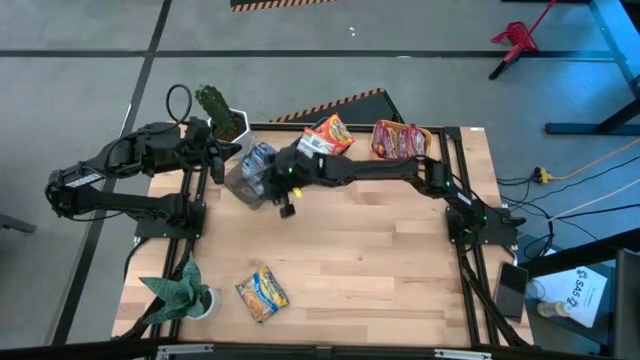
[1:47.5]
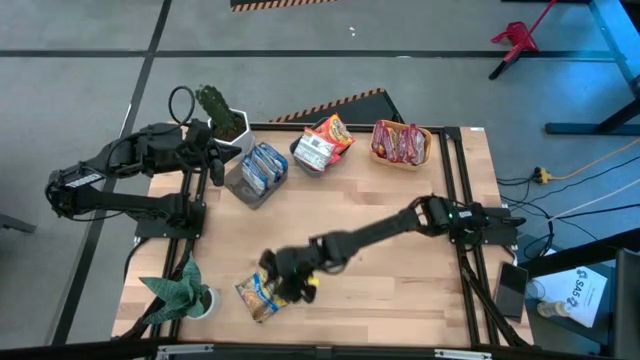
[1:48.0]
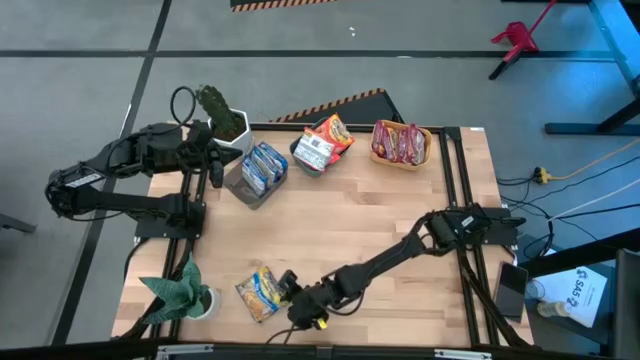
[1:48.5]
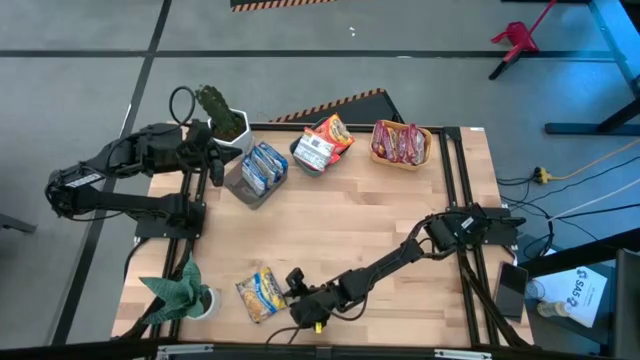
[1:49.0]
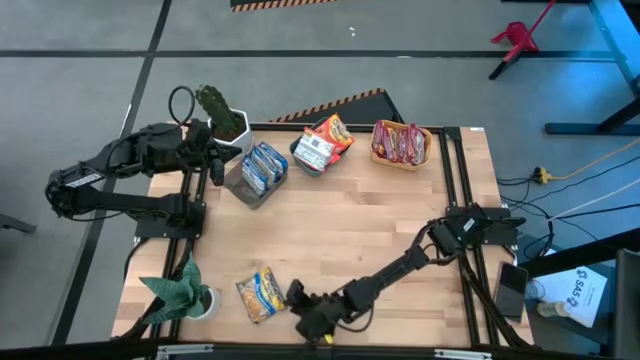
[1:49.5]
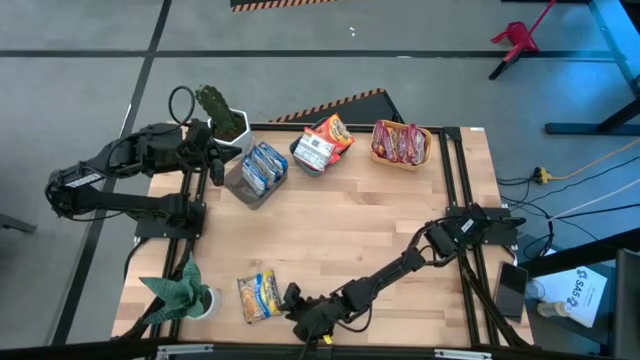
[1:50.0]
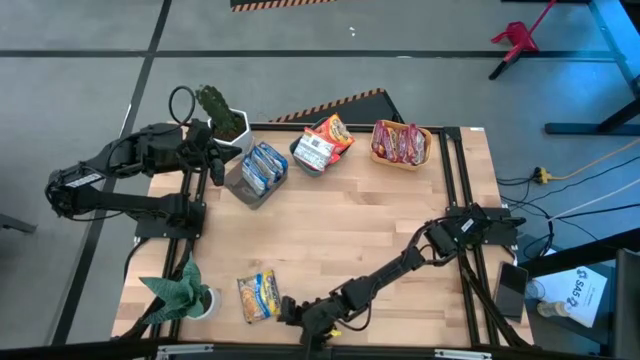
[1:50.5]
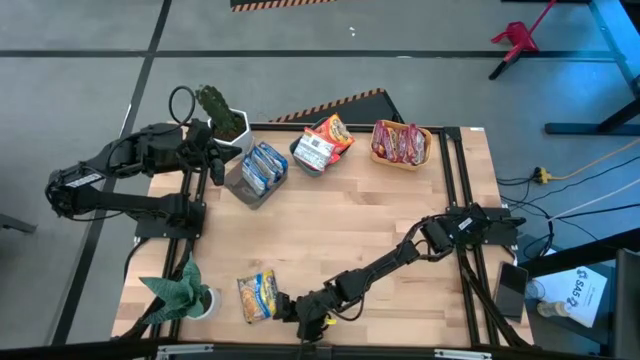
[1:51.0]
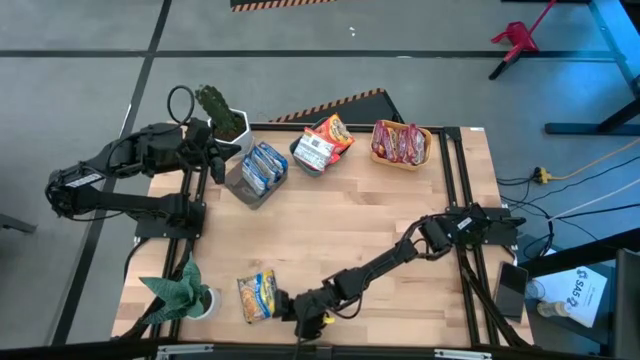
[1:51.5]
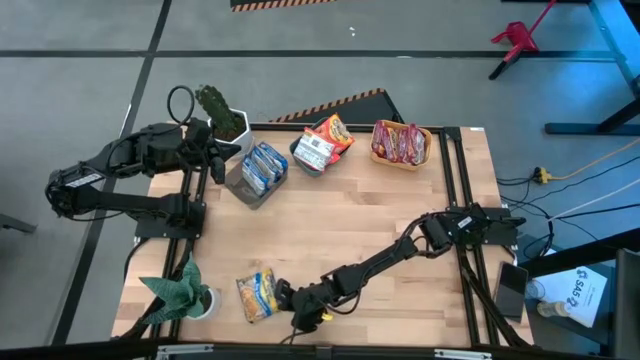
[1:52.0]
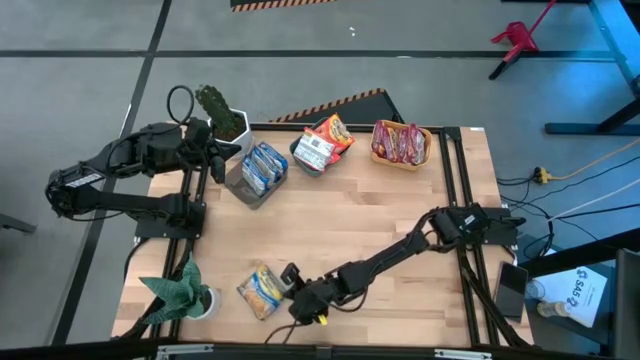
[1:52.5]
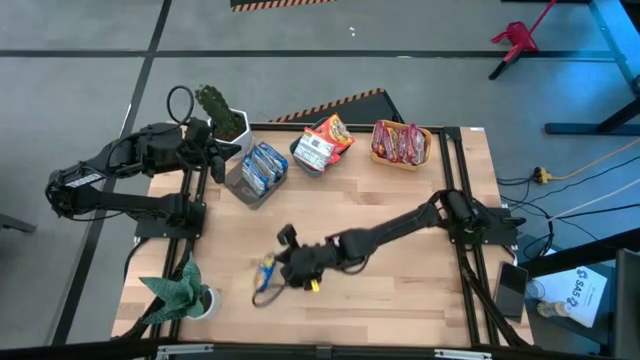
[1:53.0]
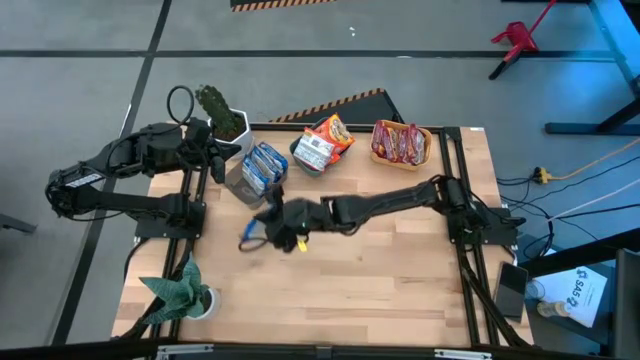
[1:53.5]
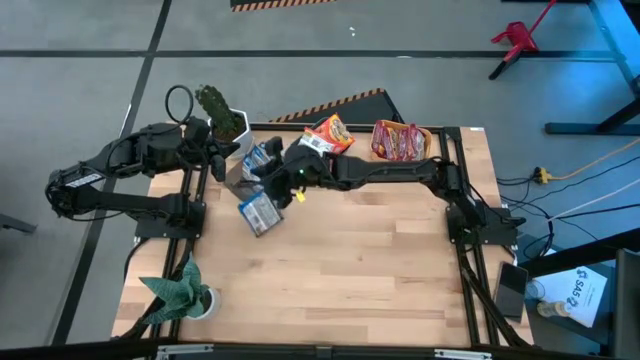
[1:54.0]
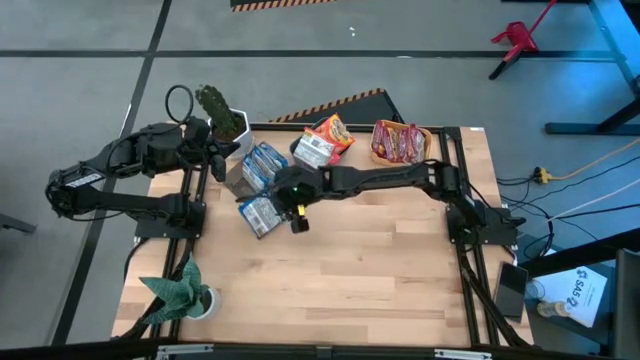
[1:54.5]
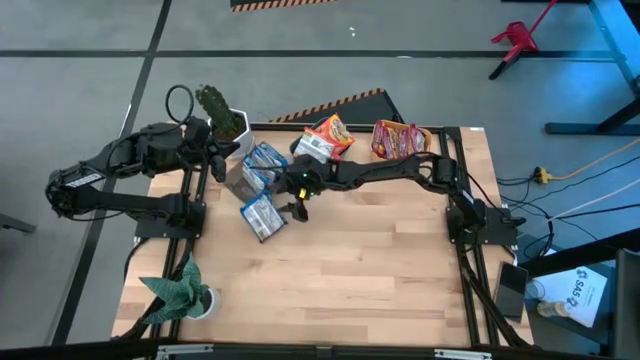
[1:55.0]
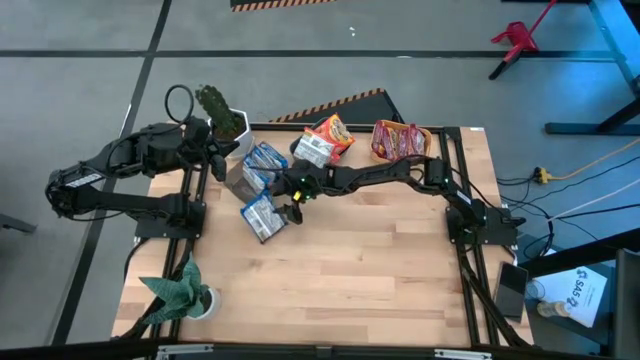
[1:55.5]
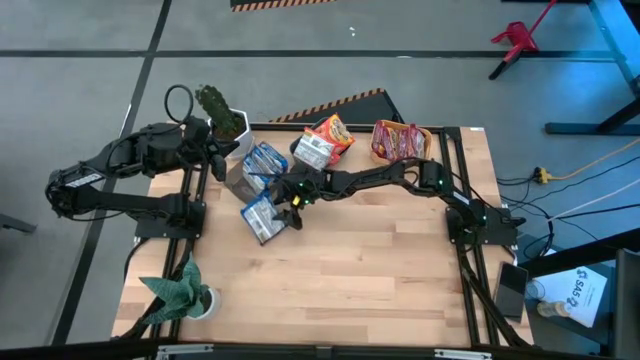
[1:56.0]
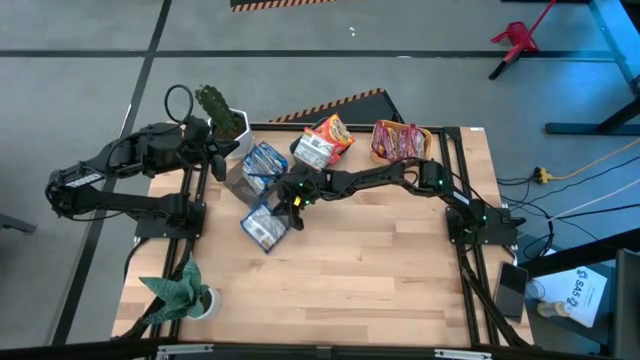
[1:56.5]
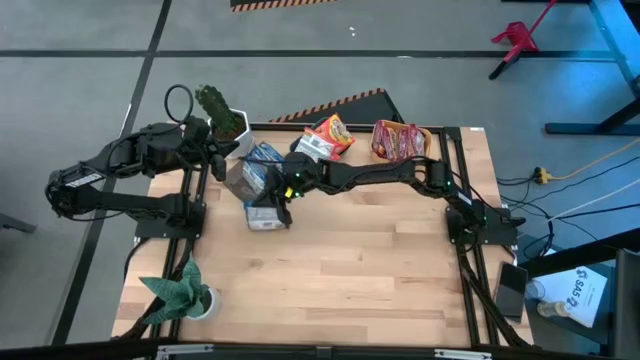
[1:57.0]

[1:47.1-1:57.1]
Task: Sort Maruchan noodles
Put the blue noodle pack into the black bin

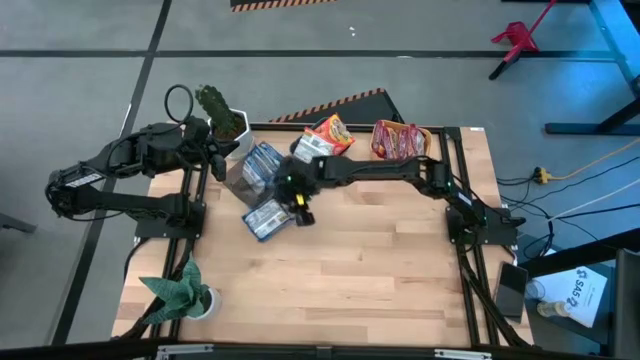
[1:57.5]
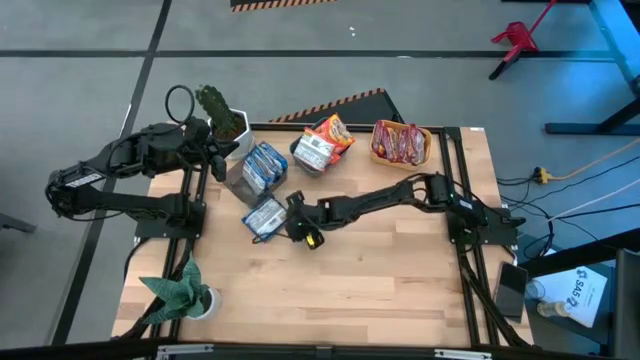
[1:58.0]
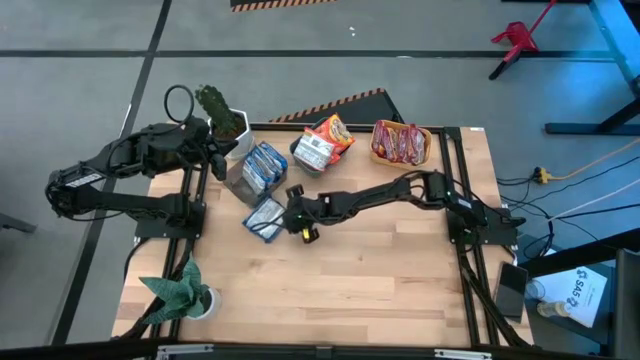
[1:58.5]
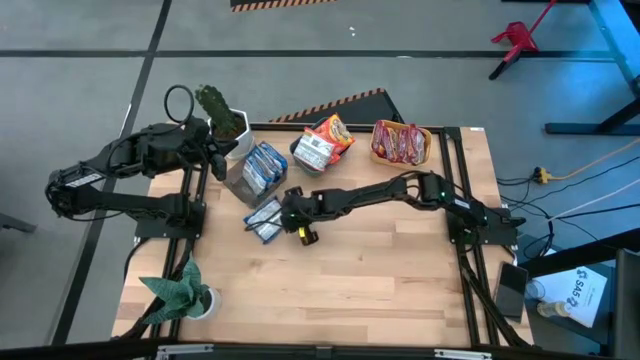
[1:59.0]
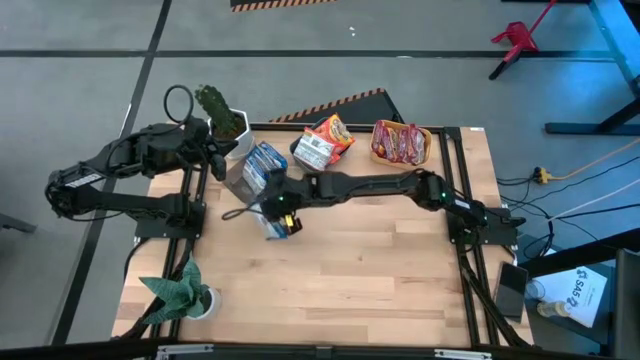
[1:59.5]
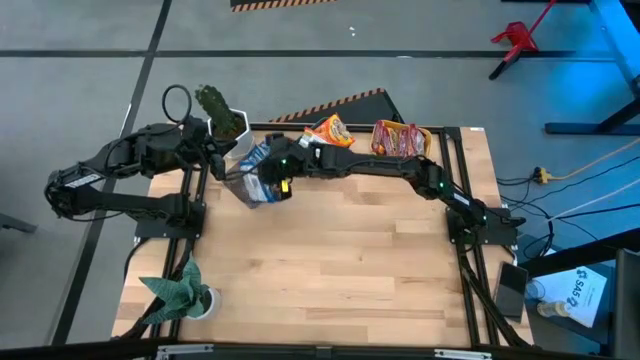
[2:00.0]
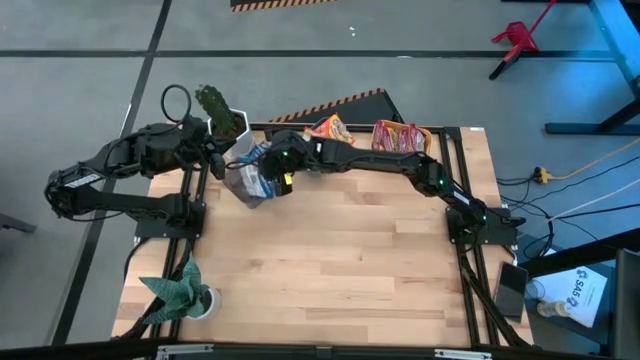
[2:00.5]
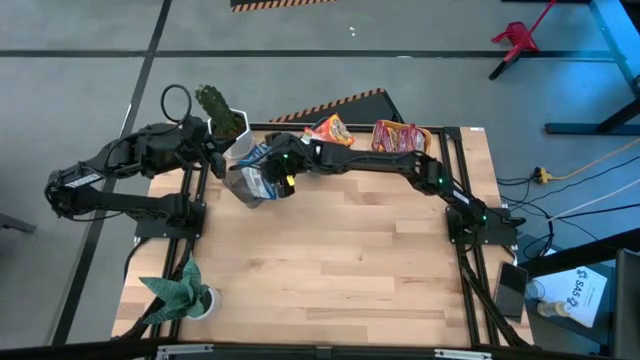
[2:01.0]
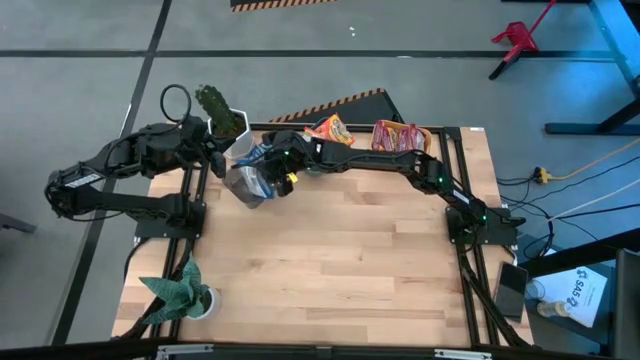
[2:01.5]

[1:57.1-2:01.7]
Put the blue noodle pack into the black bin

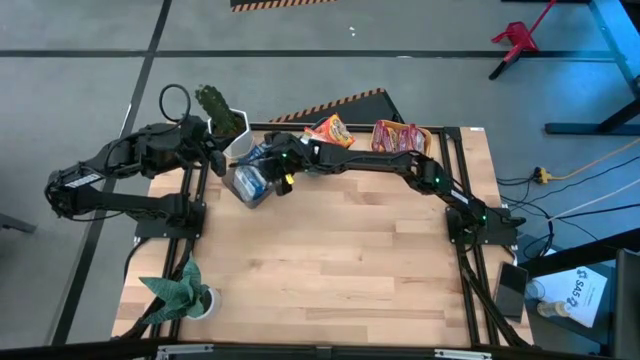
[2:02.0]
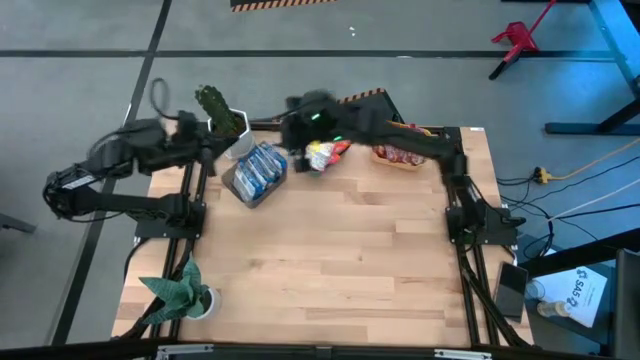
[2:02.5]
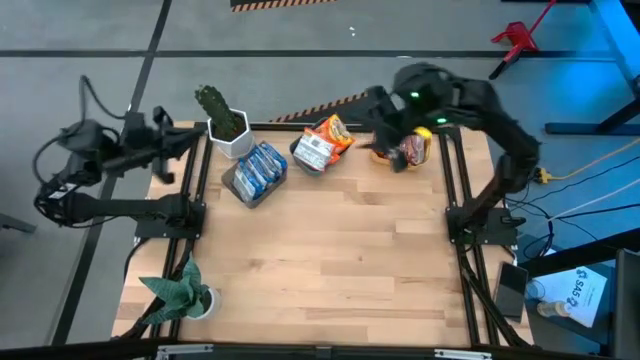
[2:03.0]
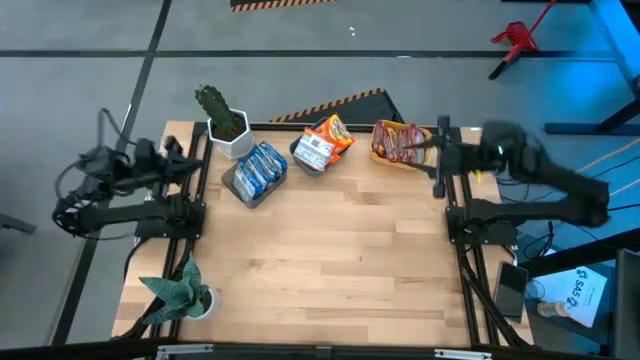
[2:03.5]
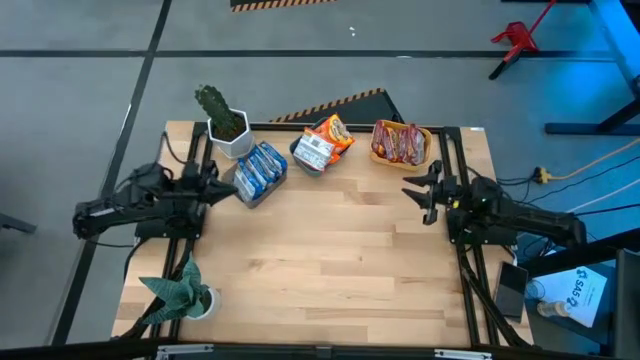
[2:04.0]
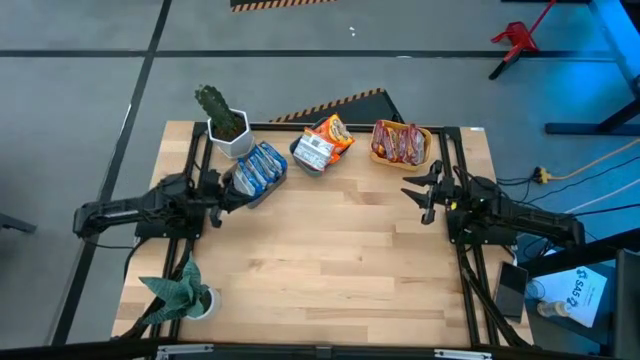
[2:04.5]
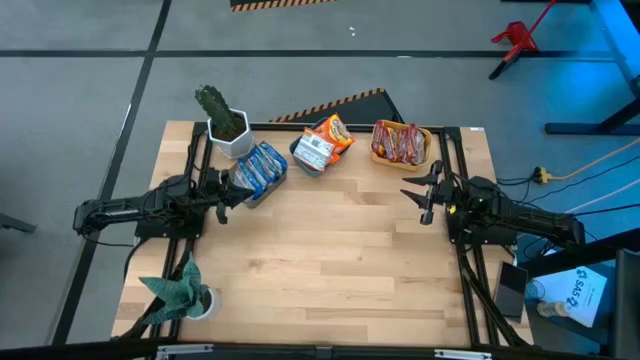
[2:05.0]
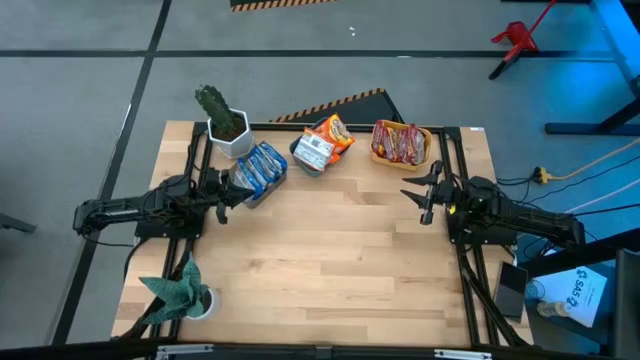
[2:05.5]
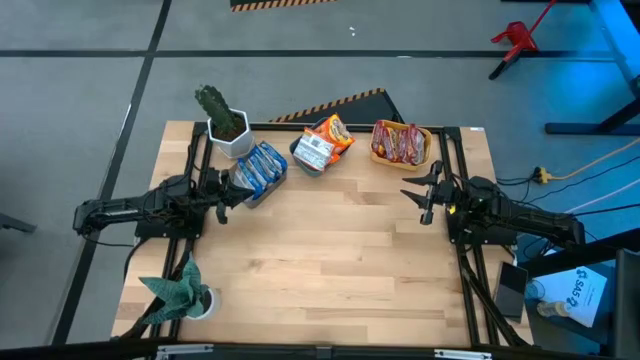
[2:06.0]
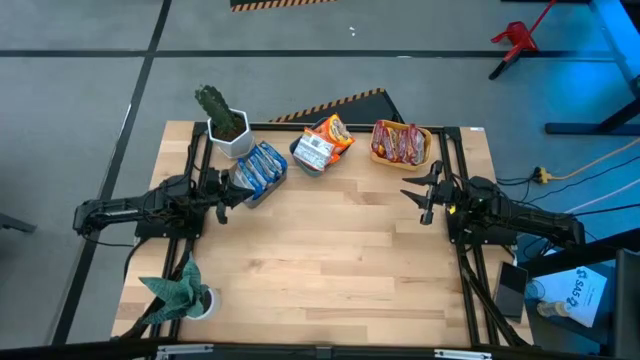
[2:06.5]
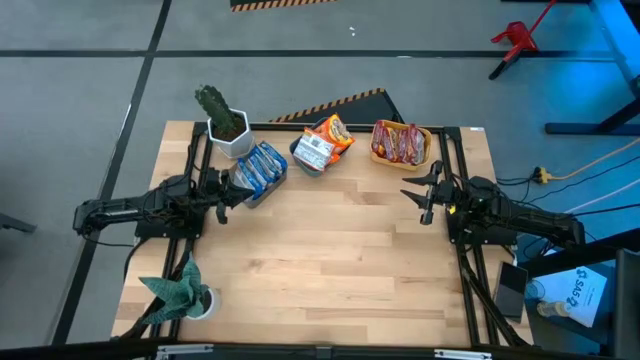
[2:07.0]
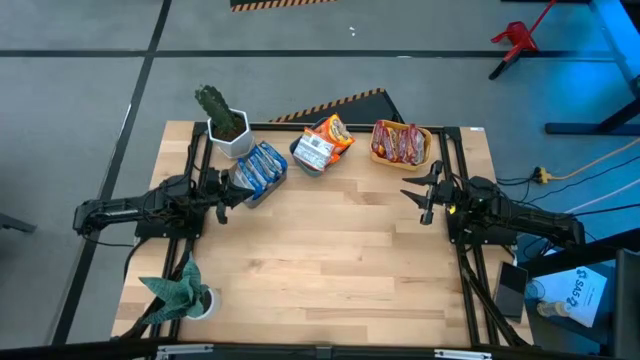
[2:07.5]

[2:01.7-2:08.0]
Return to Home Position

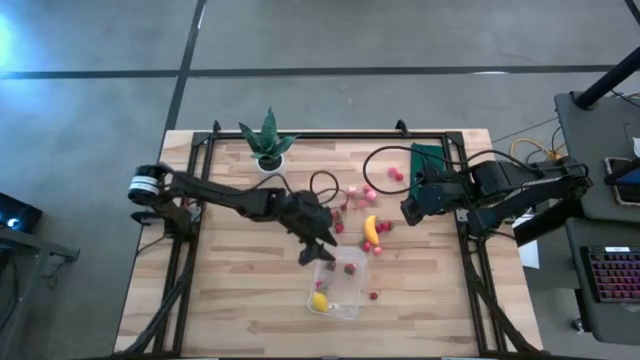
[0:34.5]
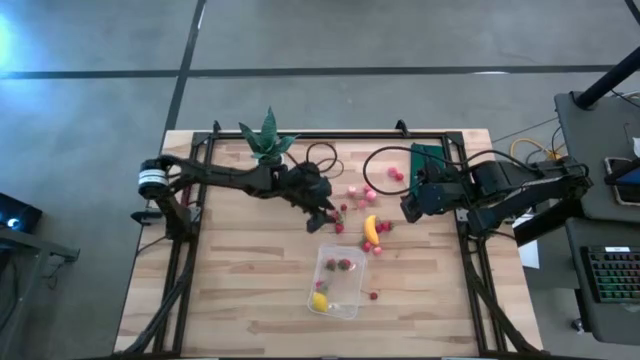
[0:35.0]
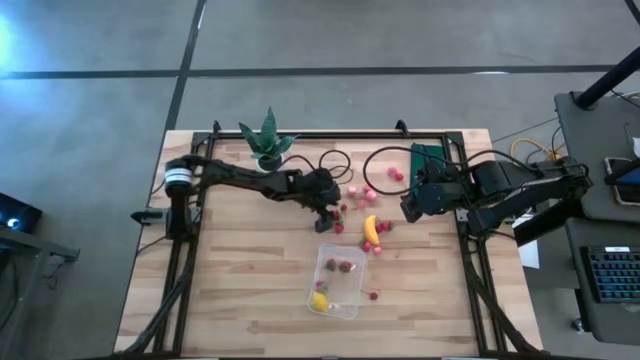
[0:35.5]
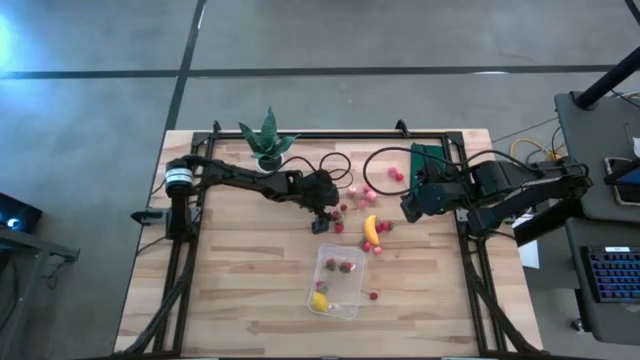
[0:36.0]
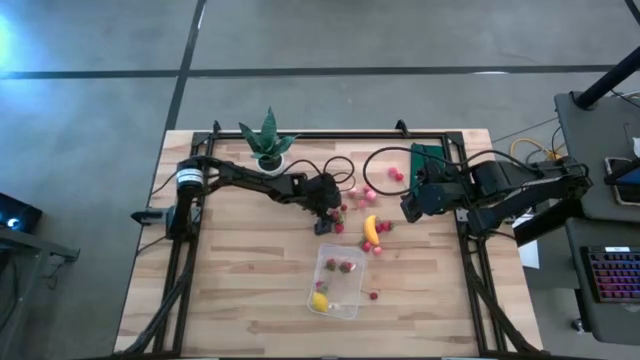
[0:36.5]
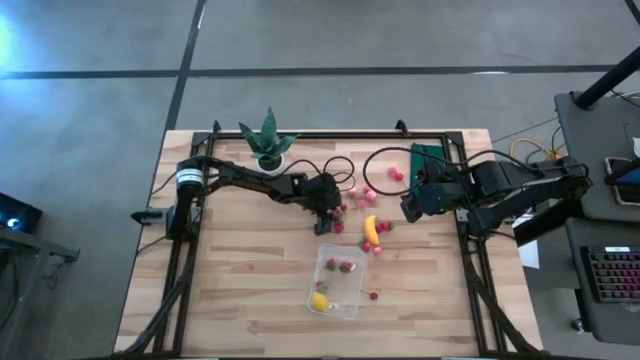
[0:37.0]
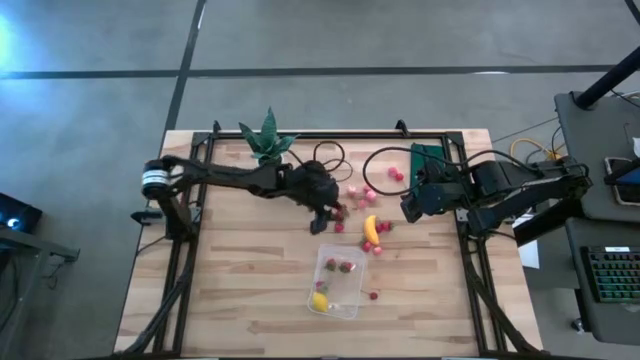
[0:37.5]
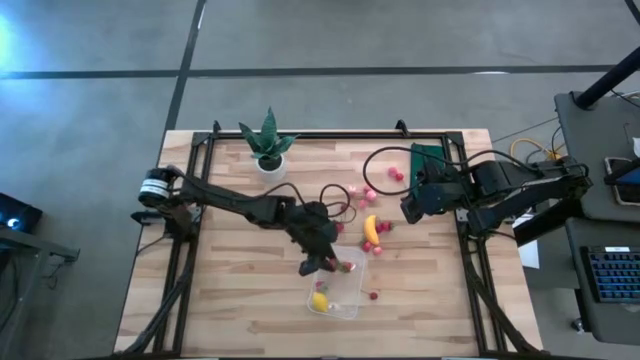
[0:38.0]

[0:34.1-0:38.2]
Task: Pick and placing Produce into tupperware
Put the strawberry into the transparent bin
